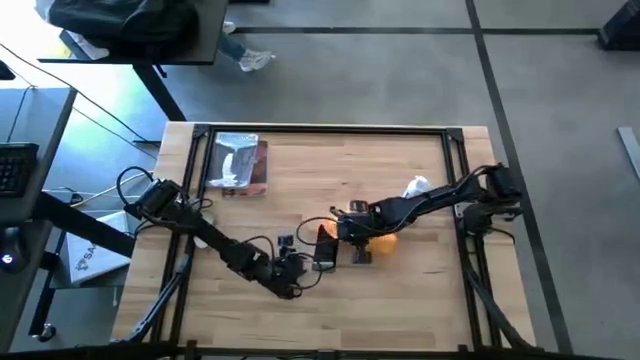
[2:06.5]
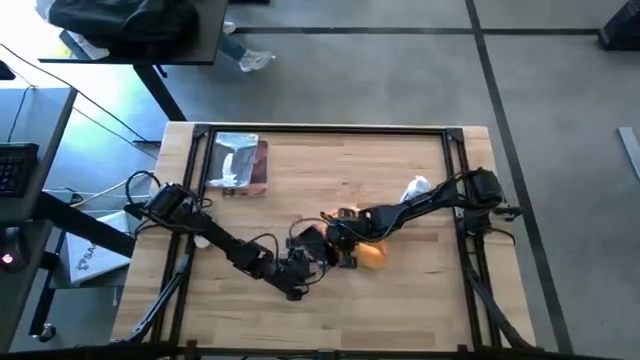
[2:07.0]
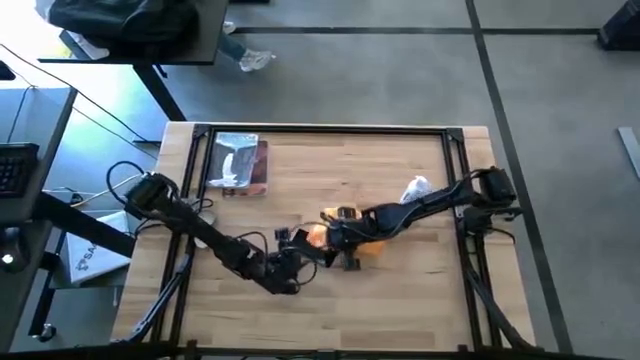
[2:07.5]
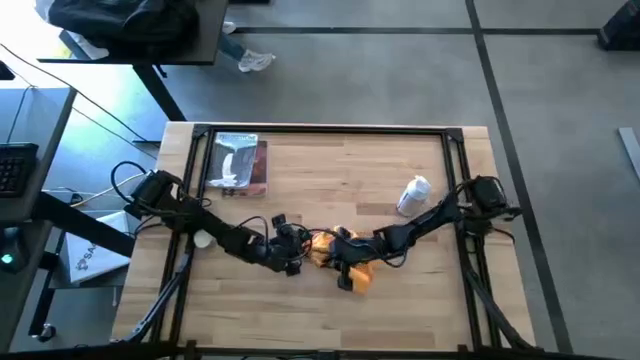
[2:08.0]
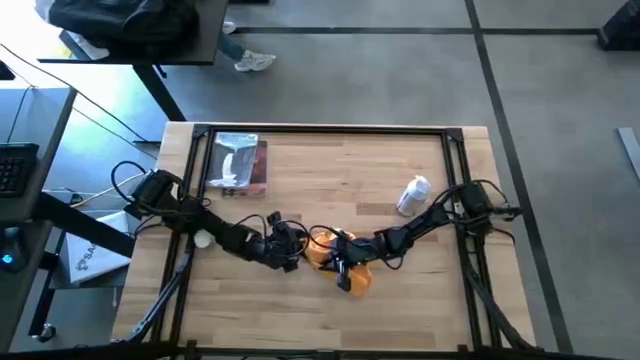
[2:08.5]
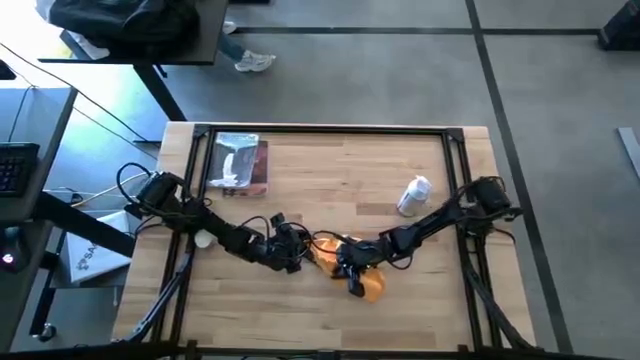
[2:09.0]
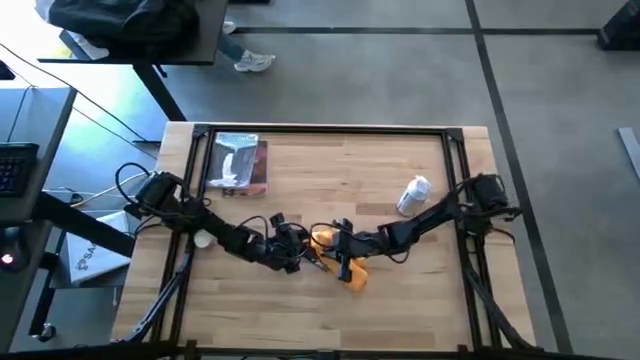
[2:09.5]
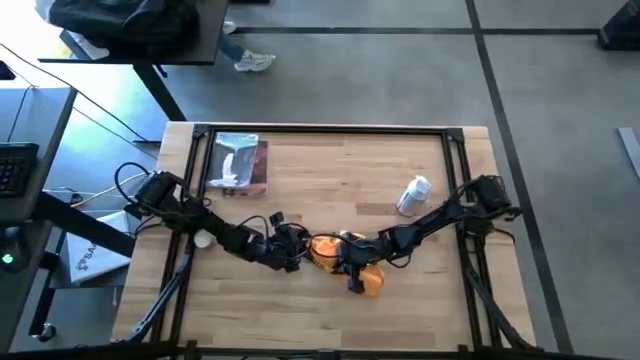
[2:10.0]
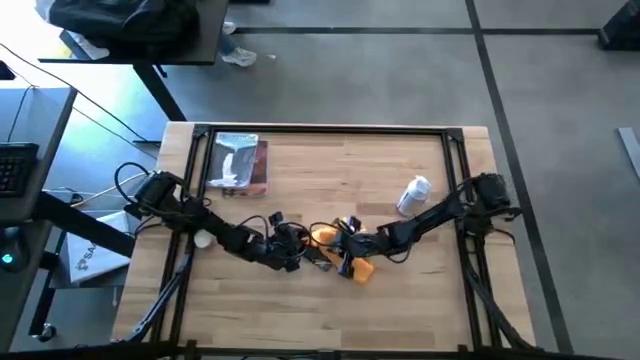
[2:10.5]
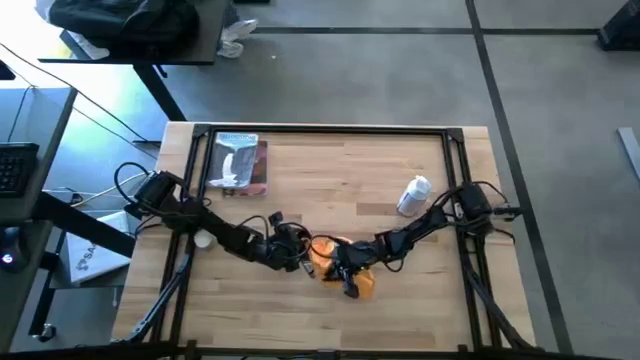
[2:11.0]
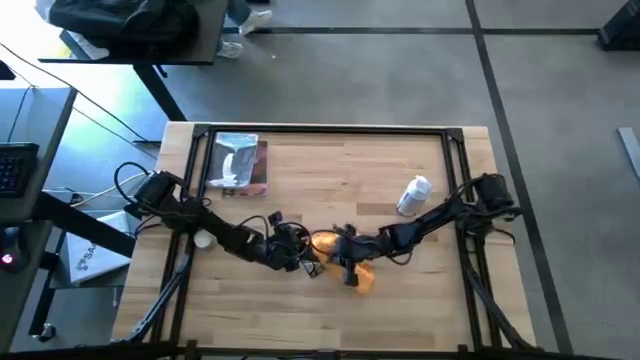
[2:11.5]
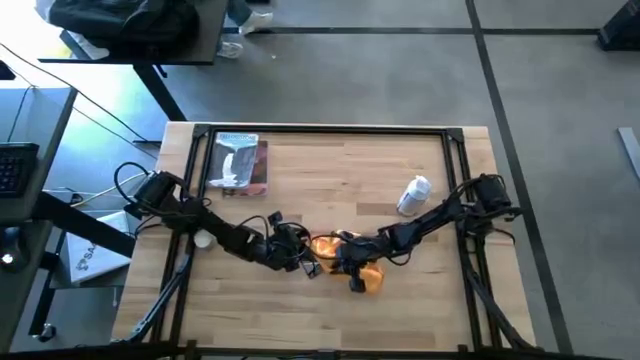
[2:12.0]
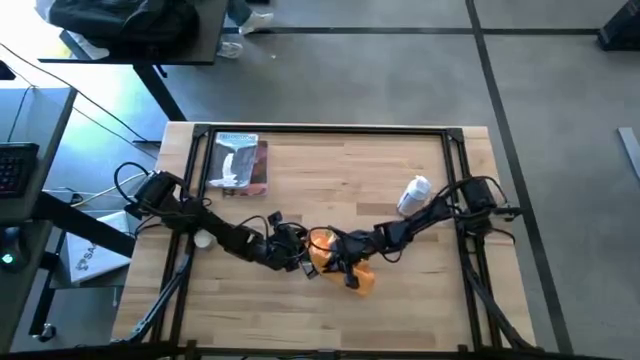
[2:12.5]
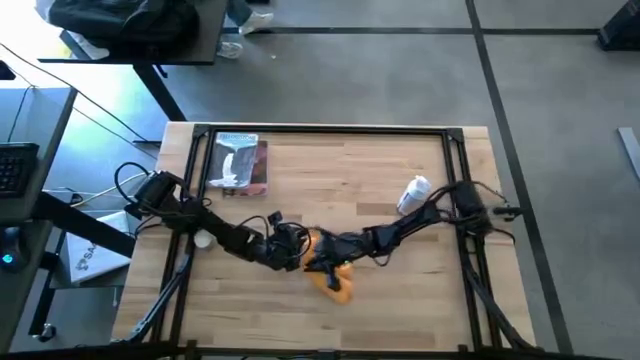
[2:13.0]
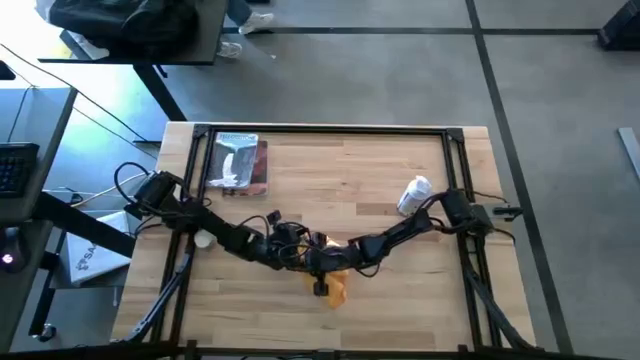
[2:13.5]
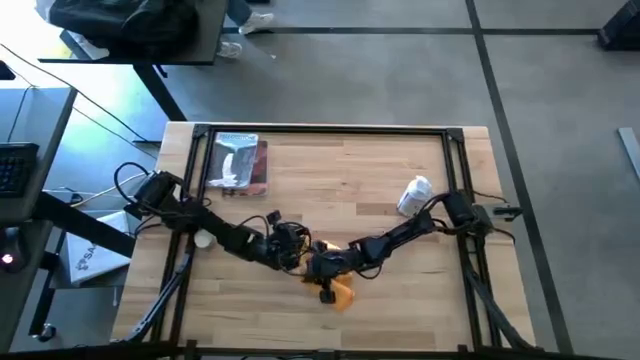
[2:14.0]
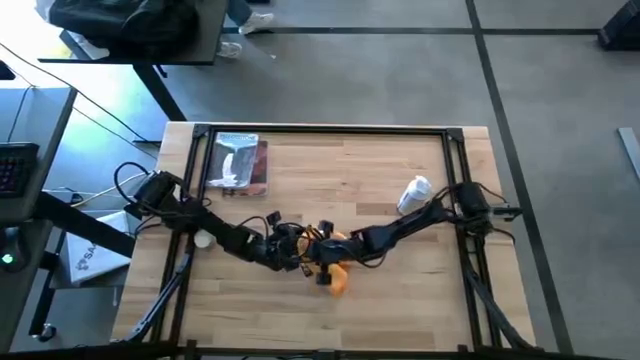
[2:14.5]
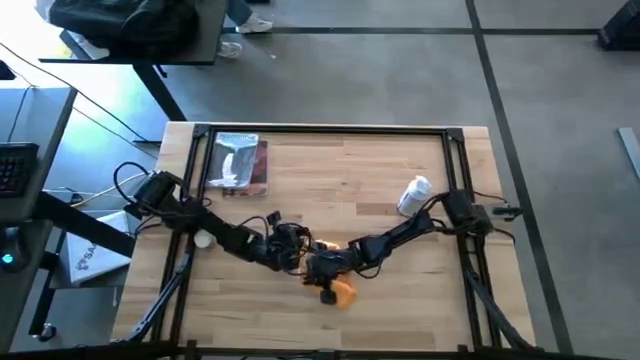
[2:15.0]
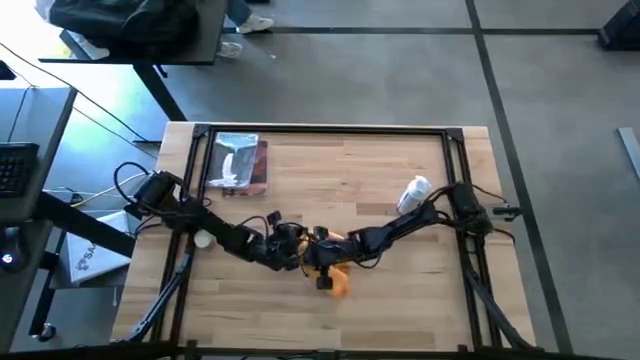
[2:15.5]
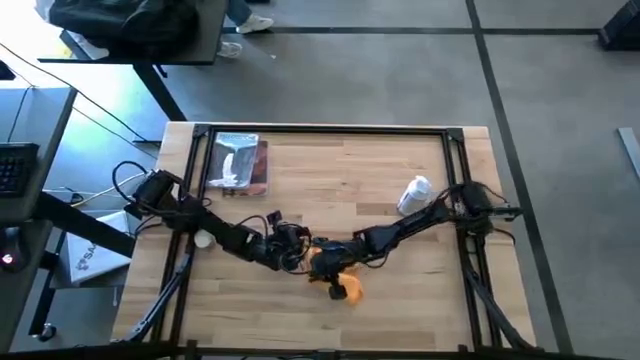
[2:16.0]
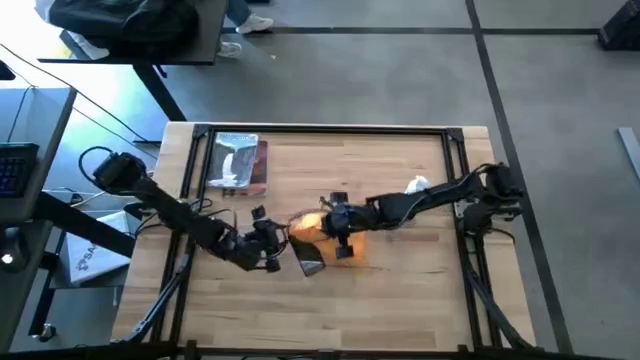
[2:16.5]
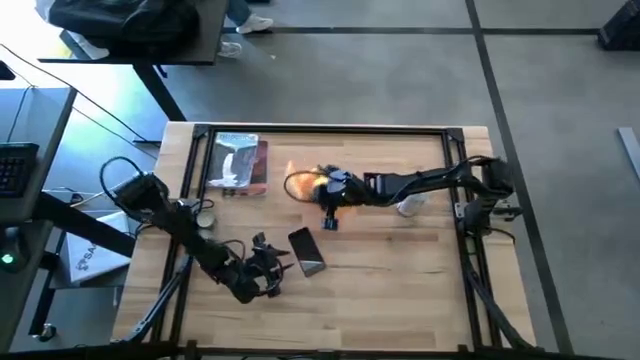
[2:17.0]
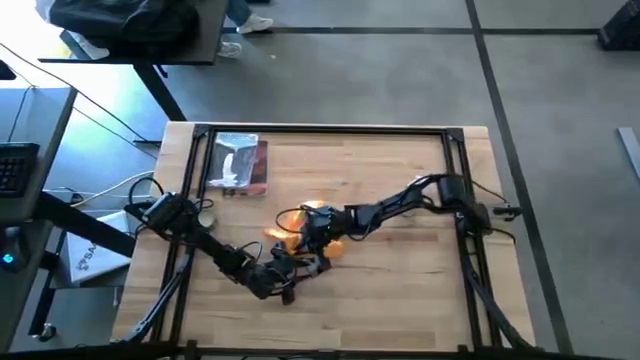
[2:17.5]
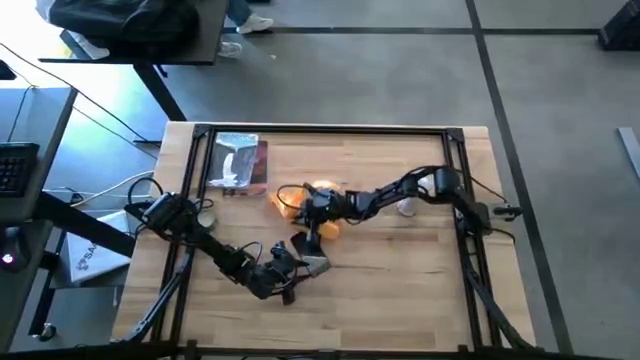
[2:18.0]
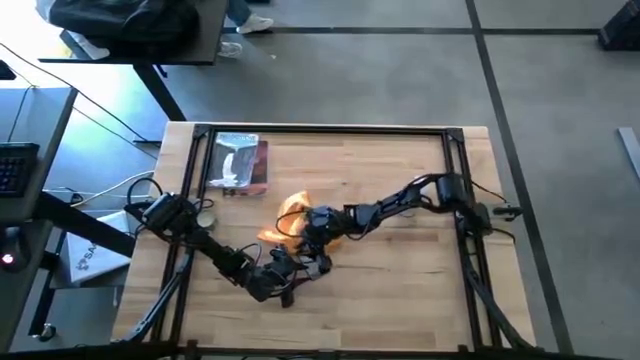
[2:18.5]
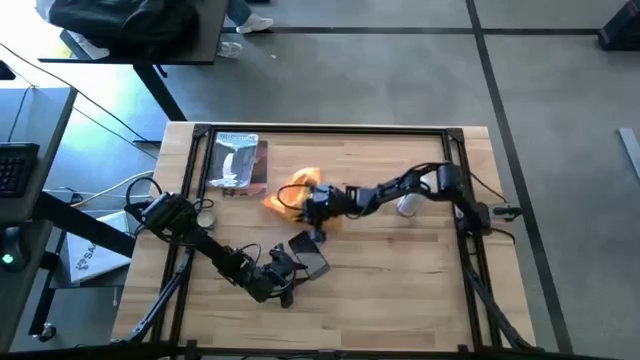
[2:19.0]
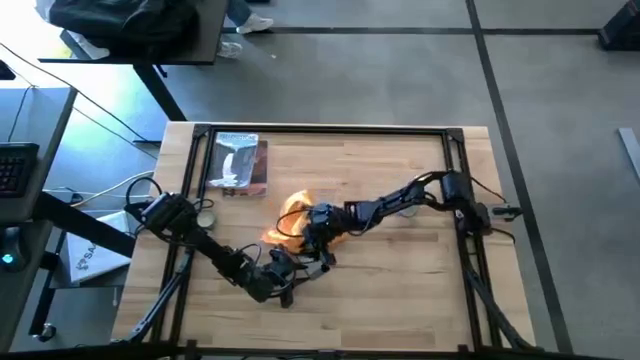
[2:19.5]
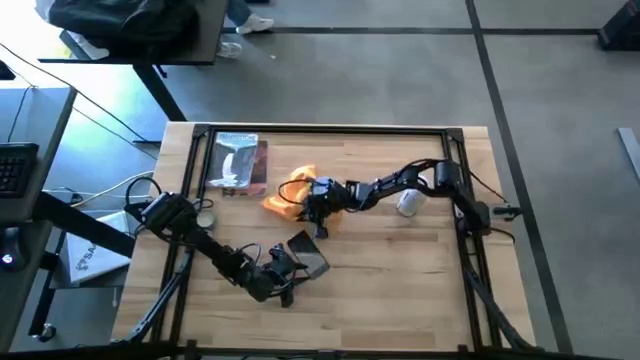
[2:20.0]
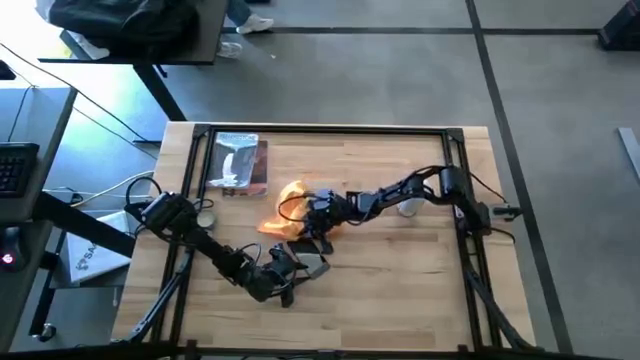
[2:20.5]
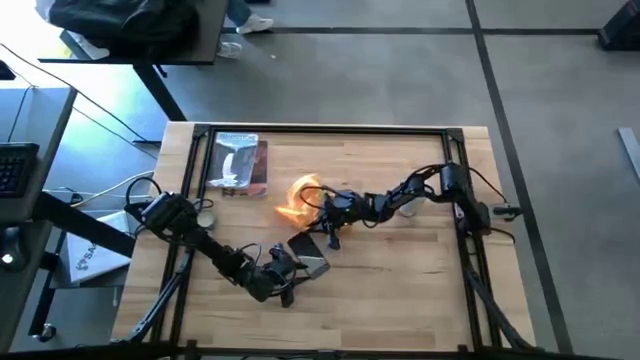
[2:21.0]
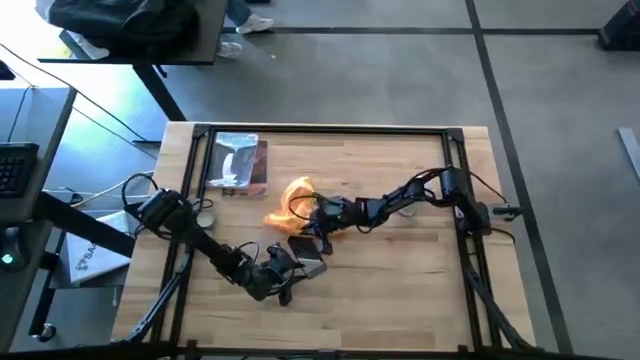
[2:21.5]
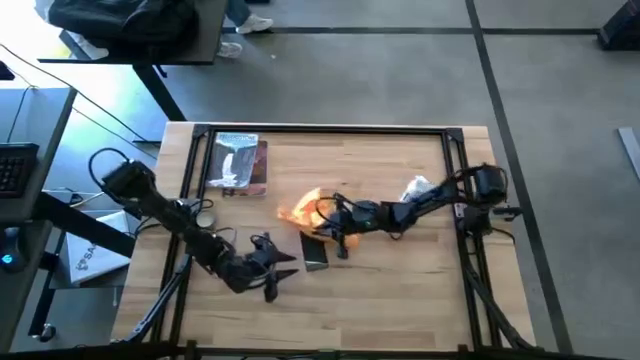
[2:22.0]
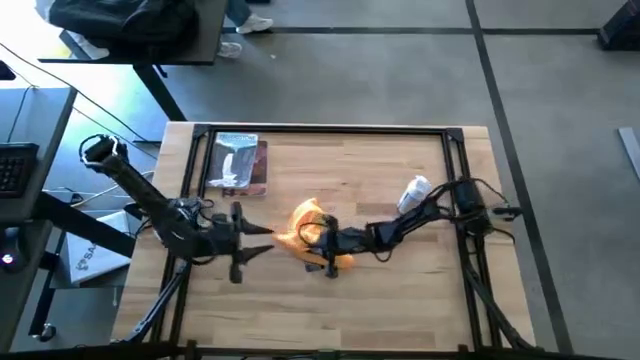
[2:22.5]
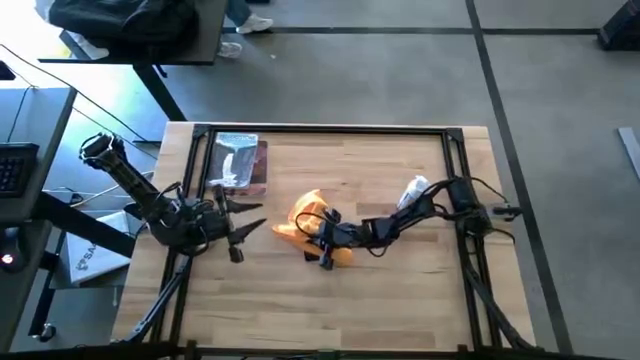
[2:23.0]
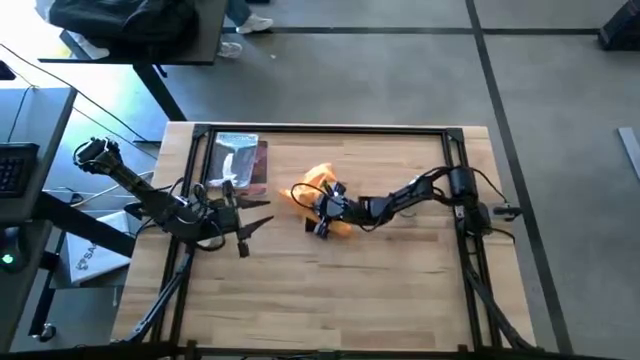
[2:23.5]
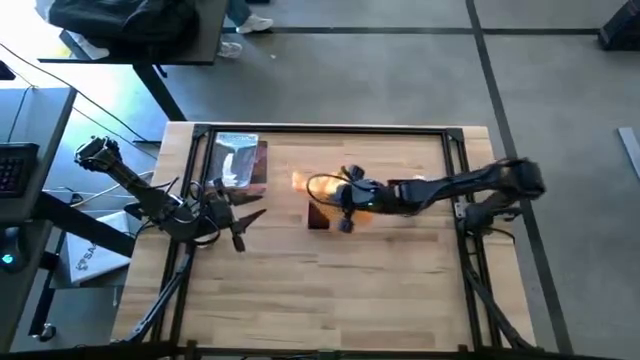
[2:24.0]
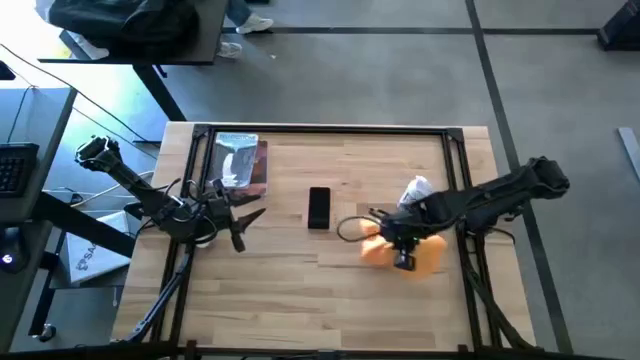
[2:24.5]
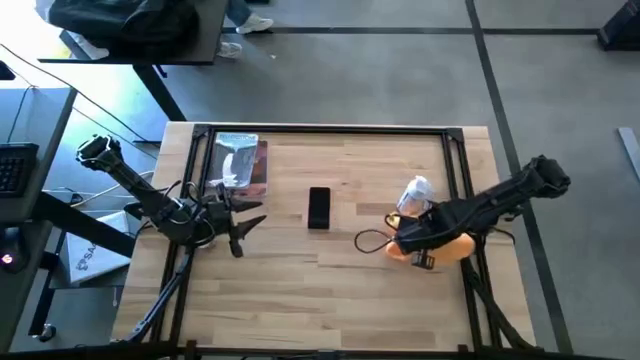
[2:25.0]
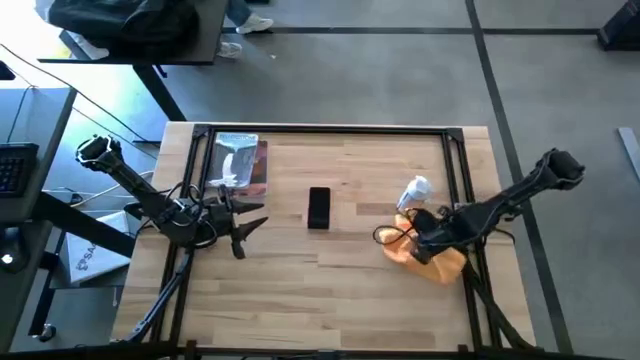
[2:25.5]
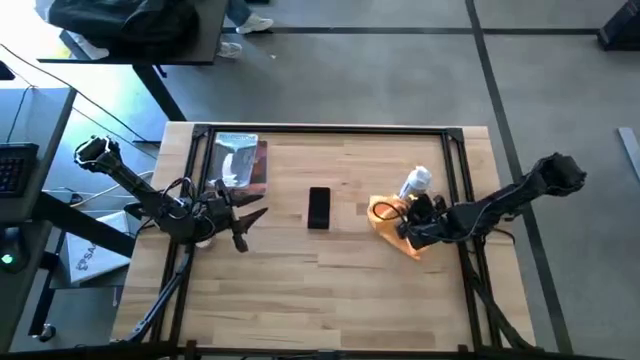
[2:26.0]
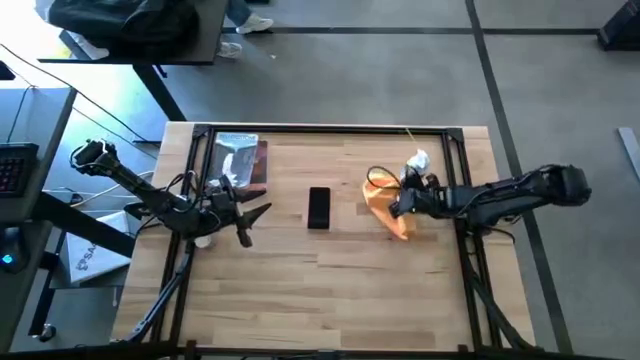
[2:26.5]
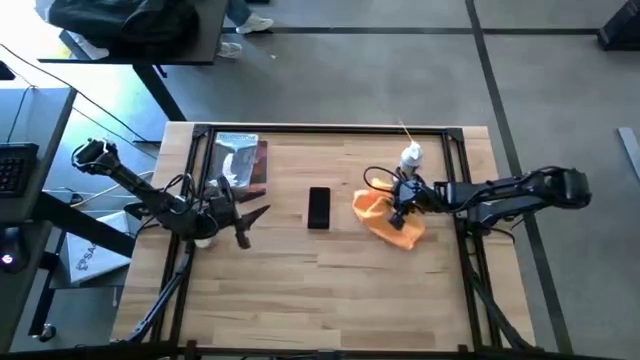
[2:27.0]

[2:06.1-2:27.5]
Task: Apply microfiber cloth
Wipe the front and back of the cellphone with the yellow microfiber cloth
